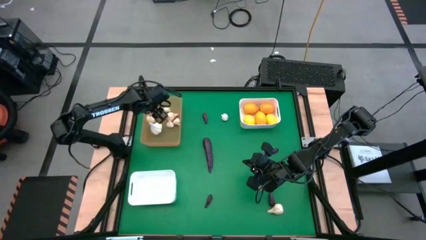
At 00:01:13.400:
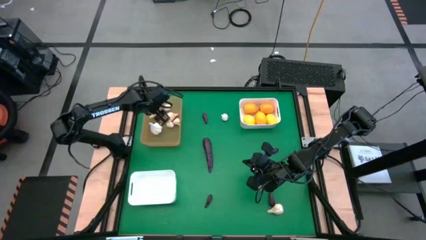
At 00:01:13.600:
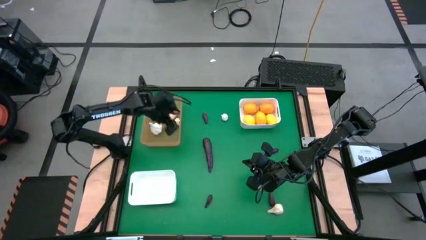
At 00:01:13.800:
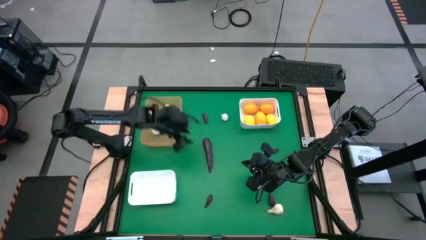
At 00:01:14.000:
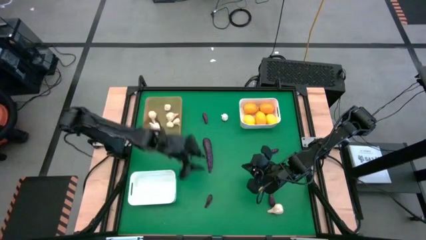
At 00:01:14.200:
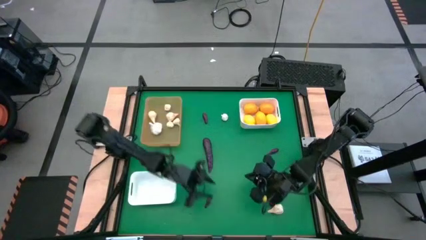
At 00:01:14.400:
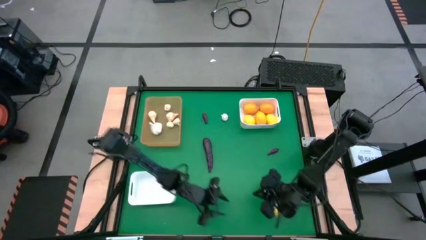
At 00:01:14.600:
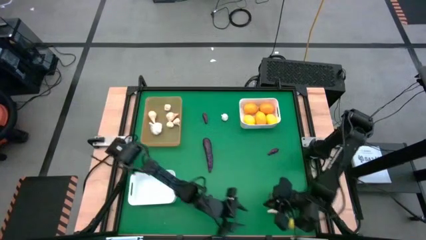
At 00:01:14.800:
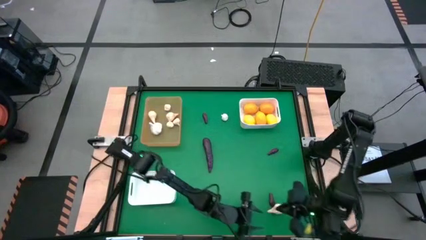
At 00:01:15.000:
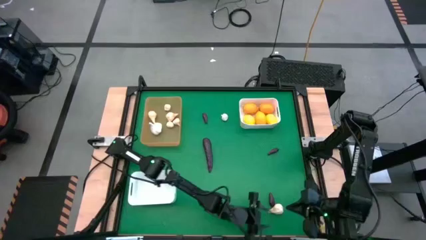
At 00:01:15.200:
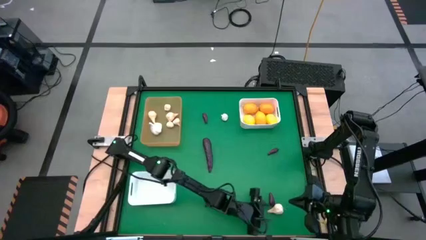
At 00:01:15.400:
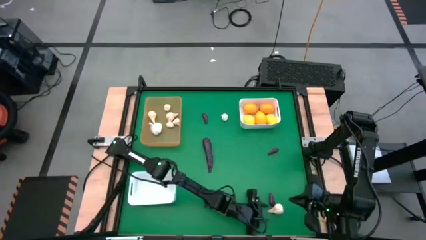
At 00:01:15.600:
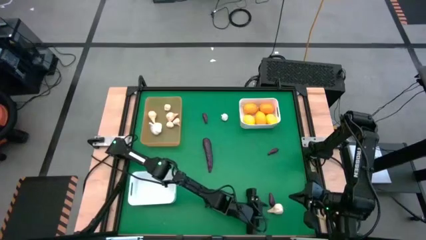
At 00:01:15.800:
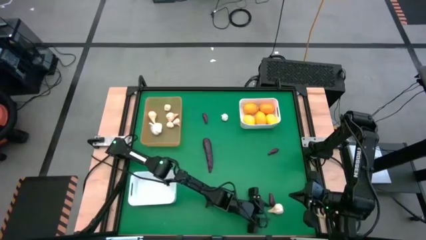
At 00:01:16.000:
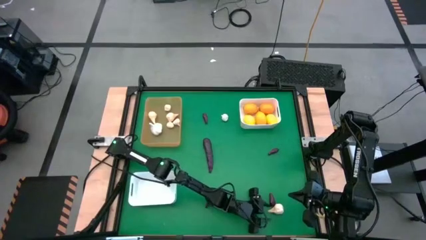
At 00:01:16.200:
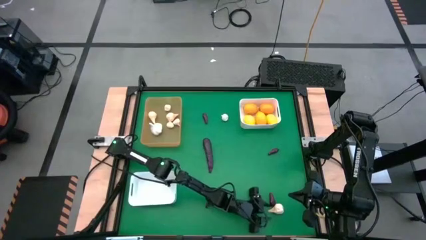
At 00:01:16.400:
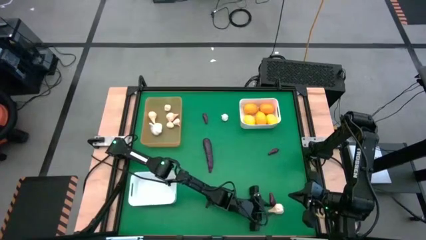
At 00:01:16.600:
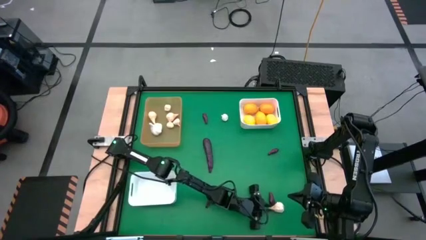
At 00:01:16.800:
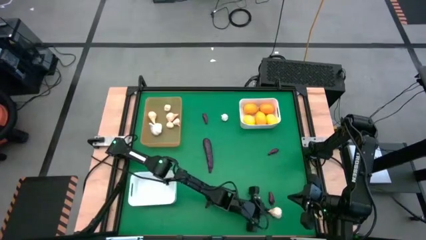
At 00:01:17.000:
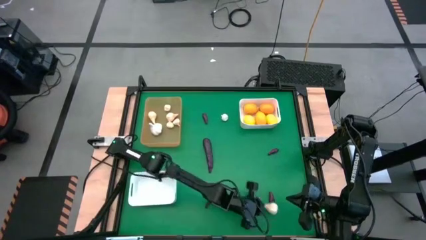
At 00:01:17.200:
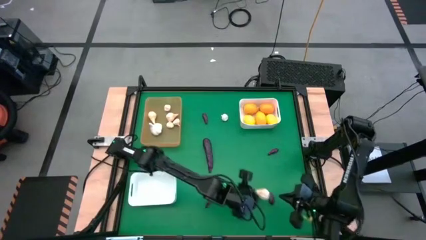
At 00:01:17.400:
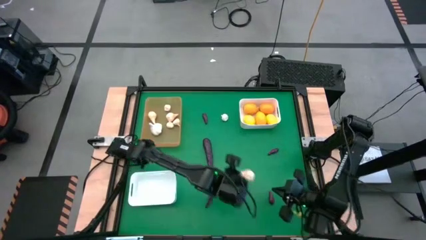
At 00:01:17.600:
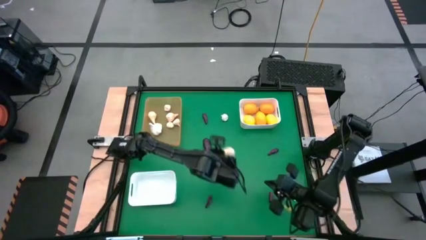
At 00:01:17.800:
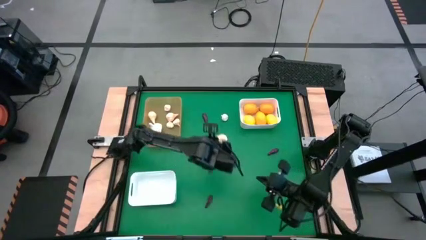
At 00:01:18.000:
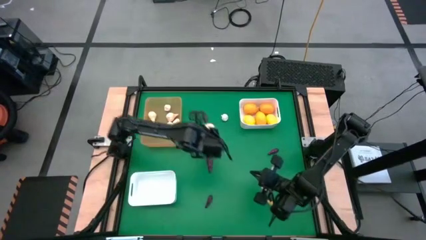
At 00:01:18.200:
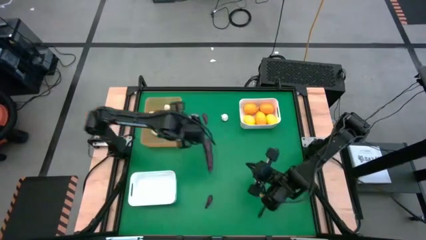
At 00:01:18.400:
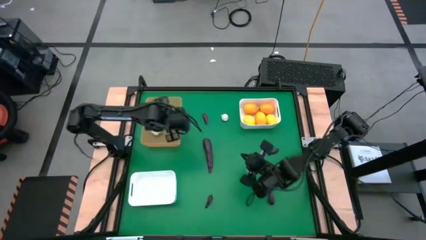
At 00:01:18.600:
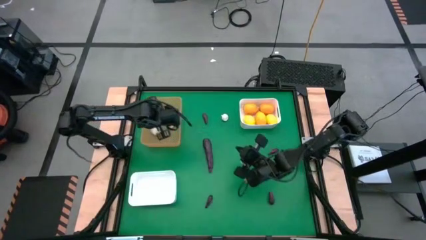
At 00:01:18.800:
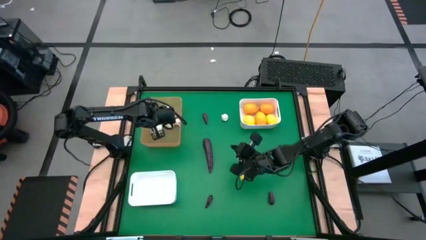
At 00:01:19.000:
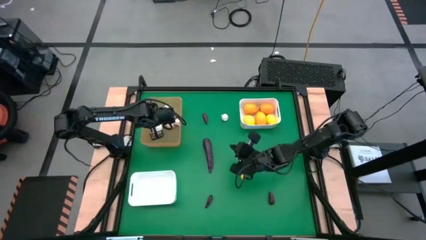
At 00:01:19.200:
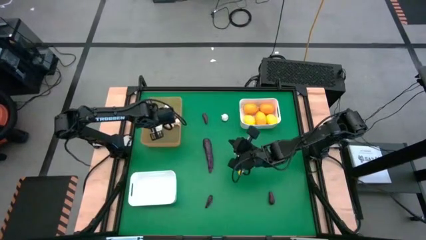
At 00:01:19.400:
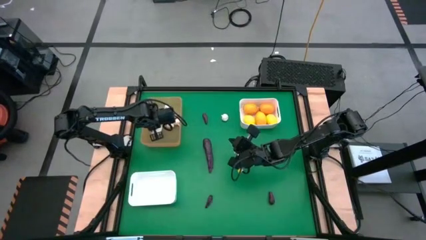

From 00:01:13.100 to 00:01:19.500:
Task: Sort produce into baskets
Put the white garlic into the orange bin

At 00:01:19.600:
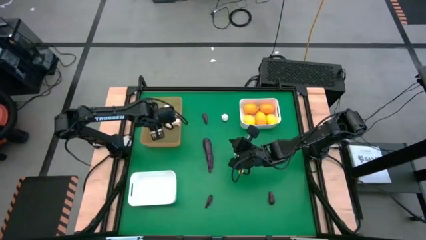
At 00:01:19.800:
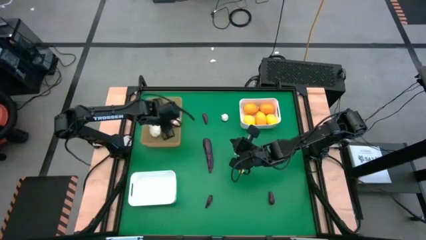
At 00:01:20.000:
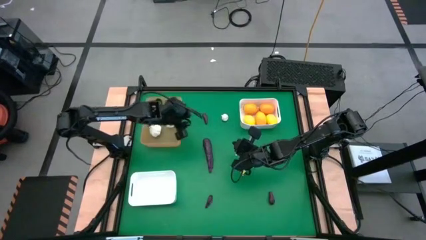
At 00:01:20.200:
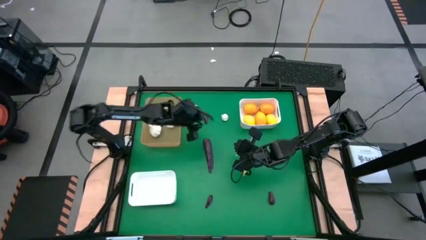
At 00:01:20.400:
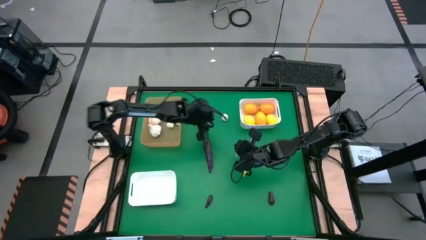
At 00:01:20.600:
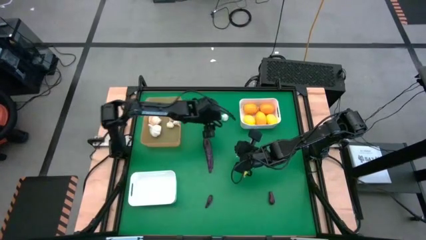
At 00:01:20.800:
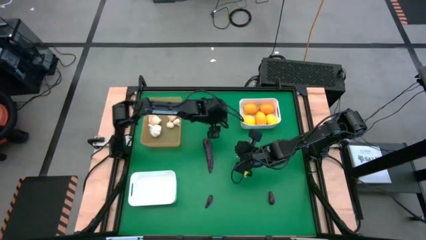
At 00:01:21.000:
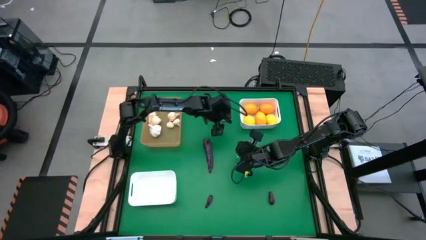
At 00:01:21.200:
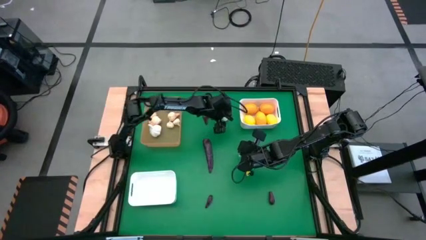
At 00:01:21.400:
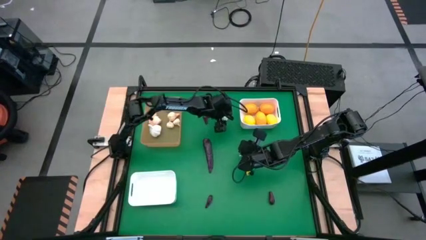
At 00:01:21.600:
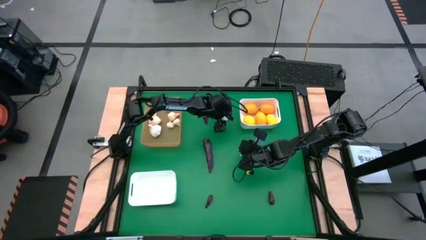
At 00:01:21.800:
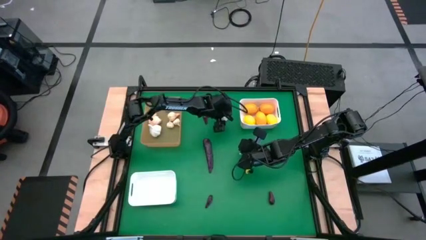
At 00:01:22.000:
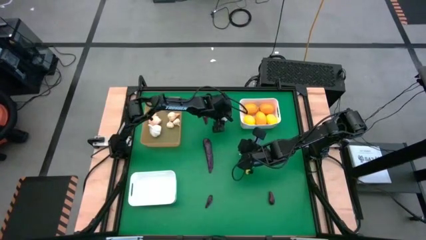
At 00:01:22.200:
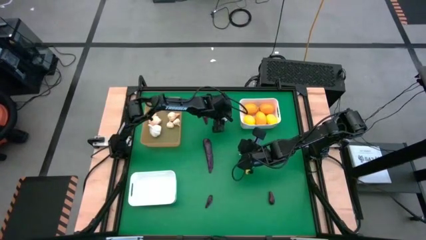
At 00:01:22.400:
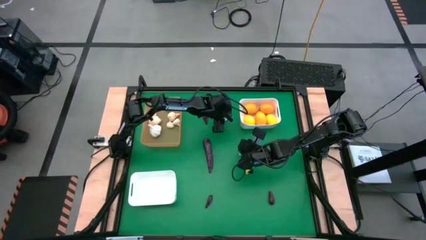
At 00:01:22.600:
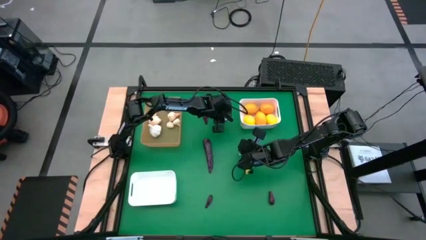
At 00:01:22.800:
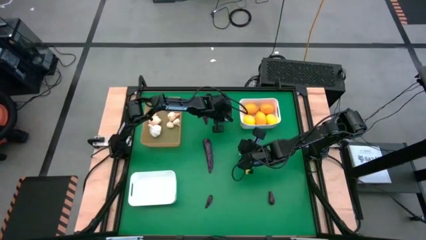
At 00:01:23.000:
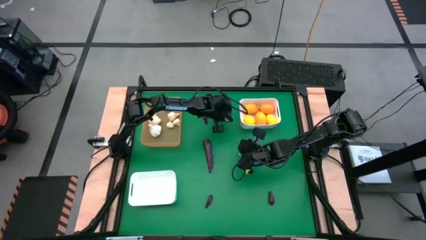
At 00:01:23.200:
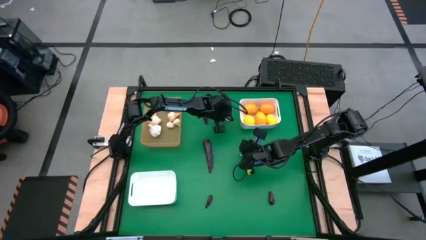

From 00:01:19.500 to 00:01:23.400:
Put the white garlic into the orange bin

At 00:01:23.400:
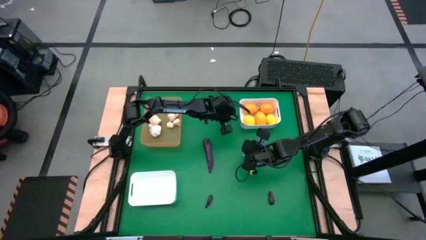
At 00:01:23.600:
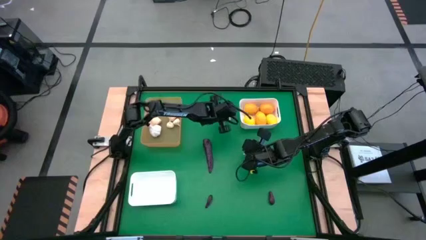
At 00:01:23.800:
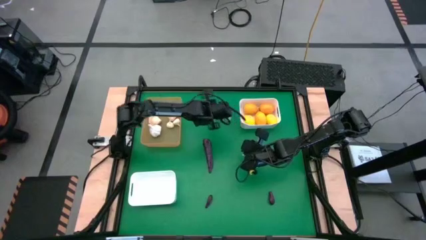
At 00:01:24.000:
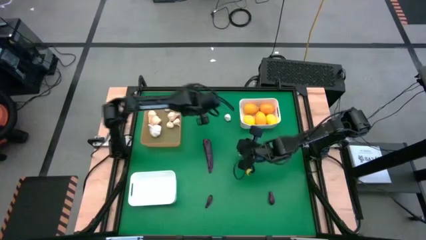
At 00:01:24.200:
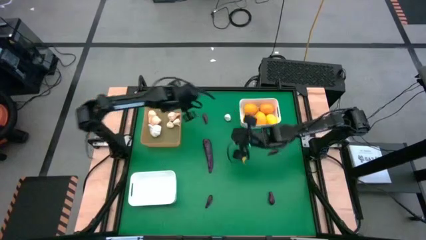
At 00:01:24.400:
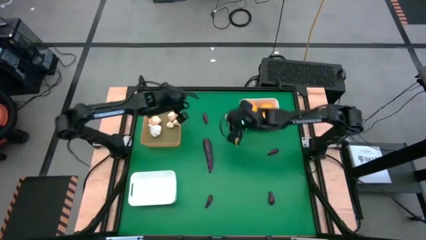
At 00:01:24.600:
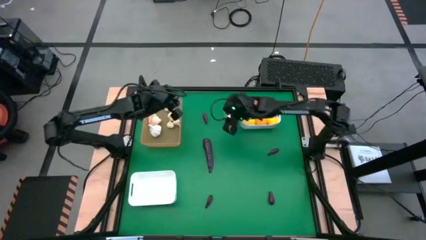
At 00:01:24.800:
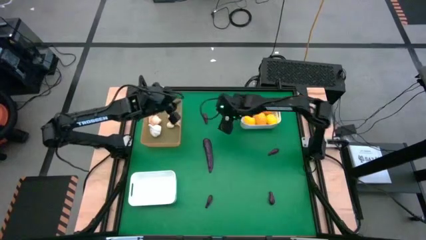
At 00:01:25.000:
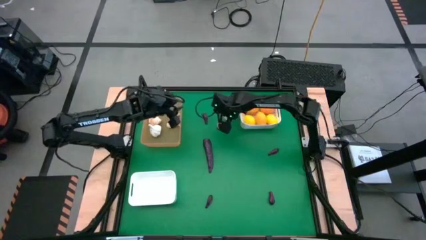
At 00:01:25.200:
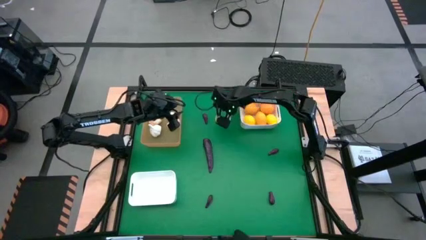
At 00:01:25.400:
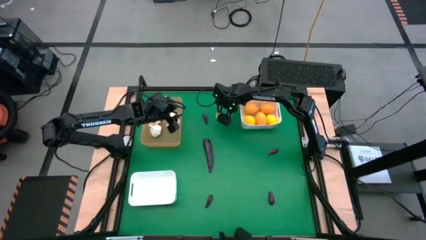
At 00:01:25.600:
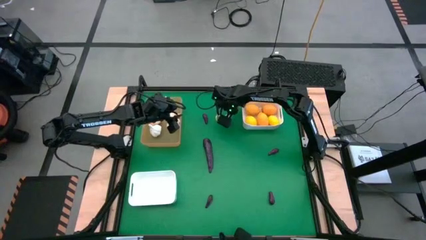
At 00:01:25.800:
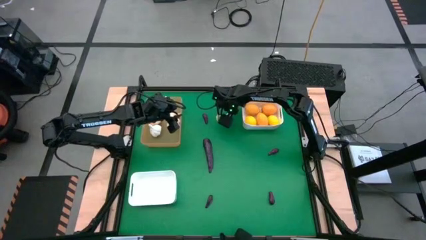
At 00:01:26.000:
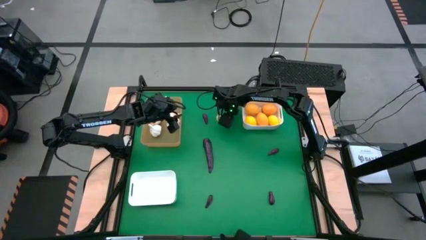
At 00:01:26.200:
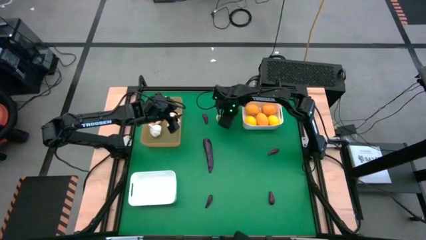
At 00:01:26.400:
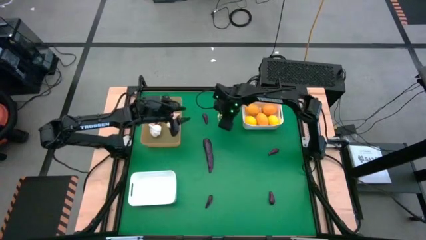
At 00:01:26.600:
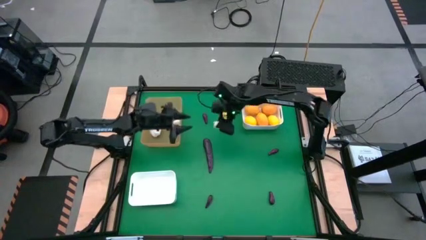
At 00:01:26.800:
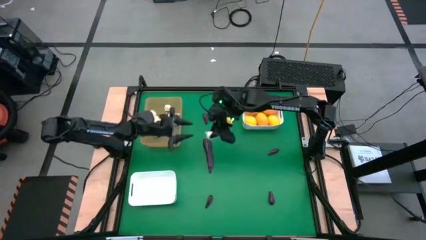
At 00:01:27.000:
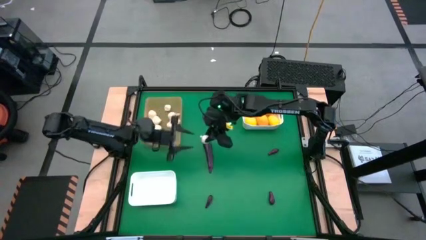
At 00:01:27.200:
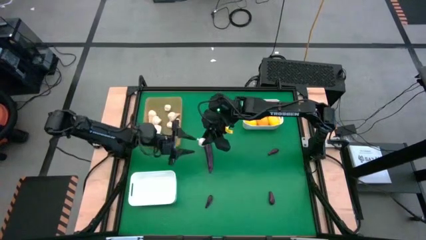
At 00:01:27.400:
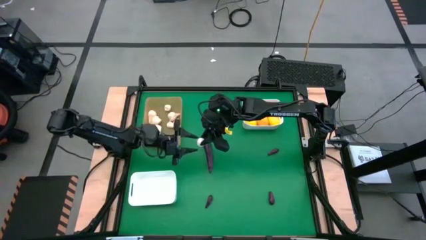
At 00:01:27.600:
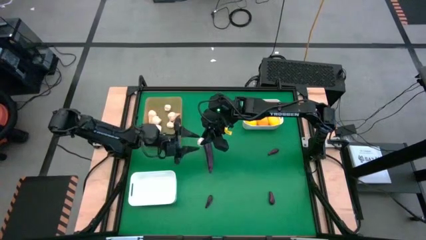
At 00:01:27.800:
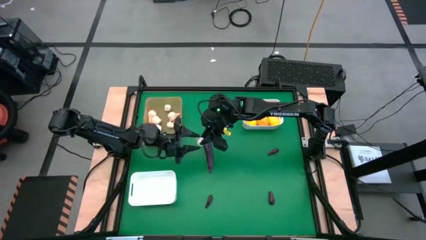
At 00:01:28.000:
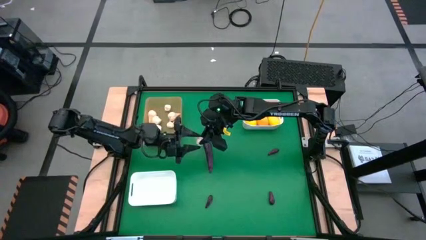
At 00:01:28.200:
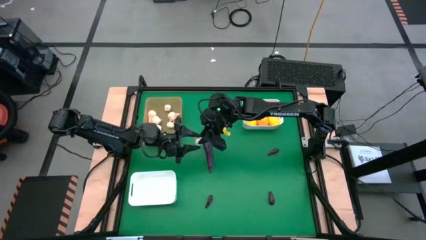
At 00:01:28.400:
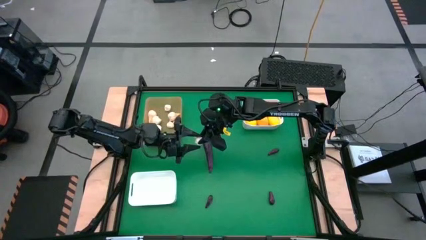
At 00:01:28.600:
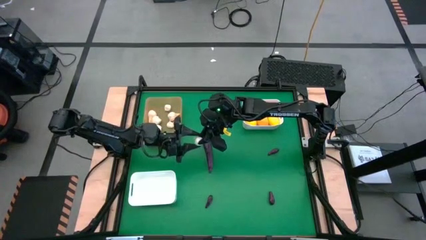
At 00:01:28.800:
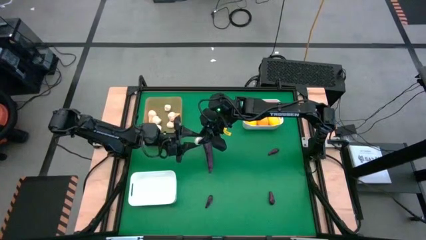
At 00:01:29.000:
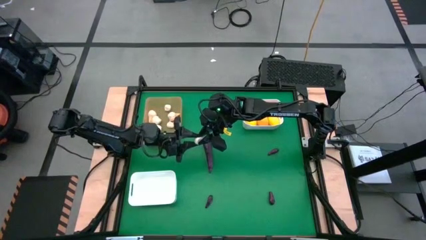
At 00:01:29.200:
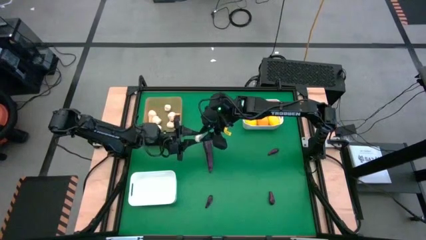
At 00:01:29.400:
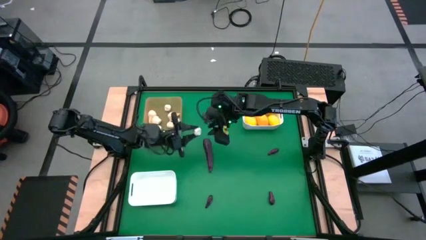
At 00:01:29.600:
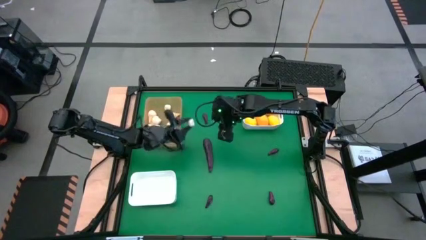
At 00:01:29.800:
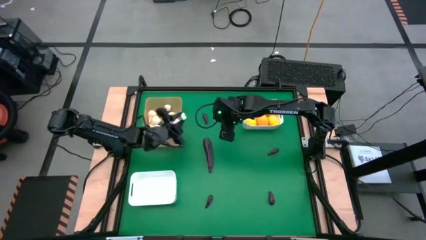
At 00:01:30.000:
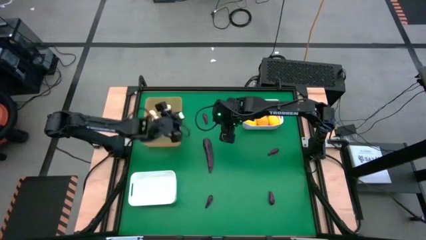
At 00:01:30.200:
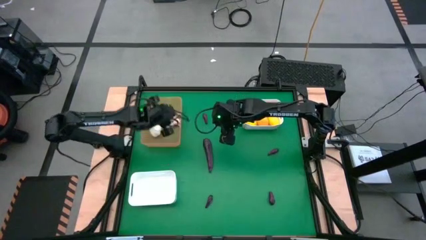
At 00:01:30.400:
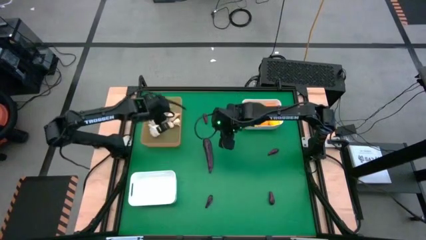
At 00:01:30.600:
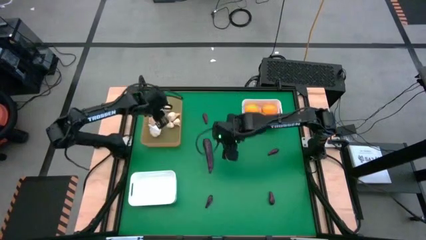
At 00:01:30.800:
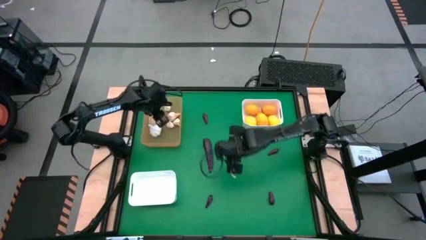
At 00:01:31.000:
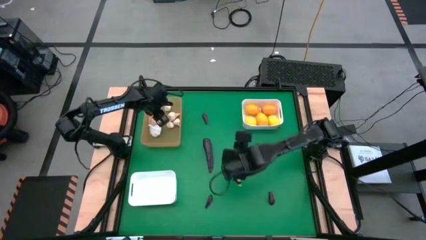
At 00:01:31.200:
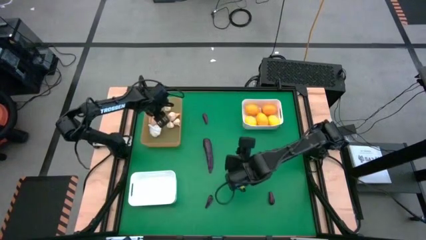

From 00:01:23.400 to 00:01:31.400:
Put the white garlic into the orange bin
